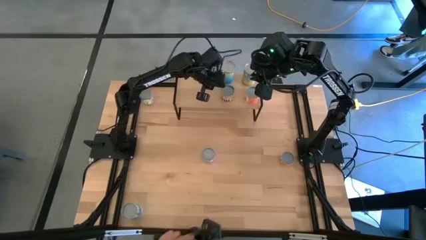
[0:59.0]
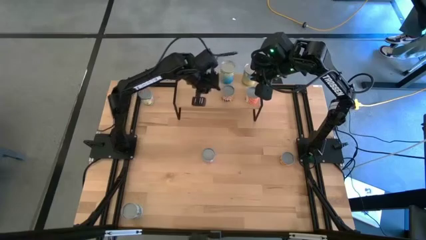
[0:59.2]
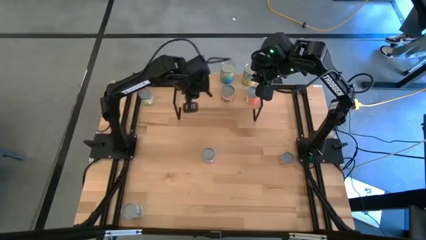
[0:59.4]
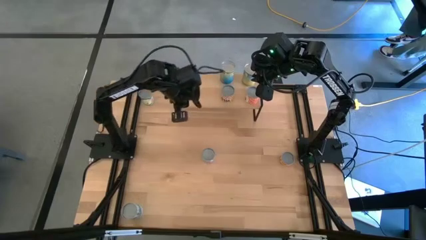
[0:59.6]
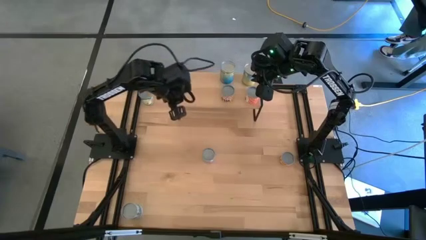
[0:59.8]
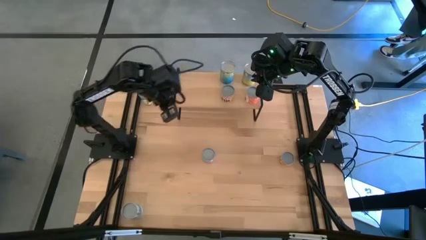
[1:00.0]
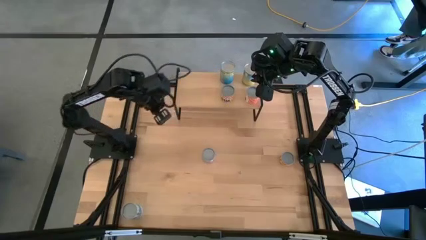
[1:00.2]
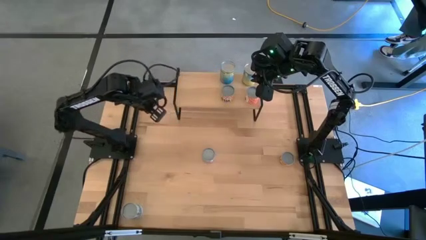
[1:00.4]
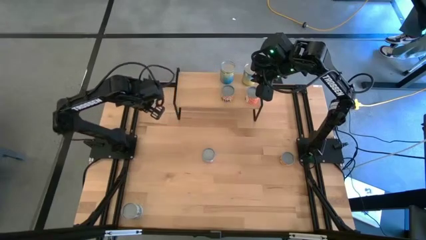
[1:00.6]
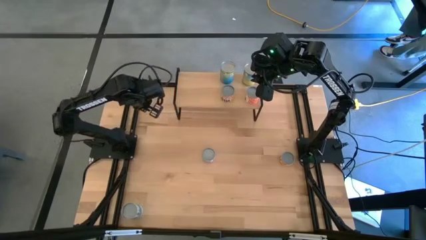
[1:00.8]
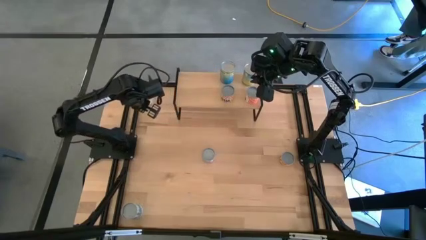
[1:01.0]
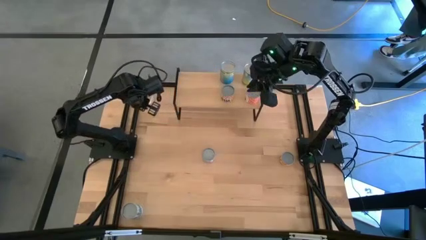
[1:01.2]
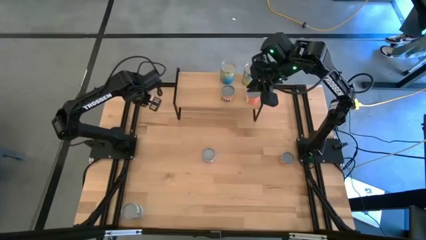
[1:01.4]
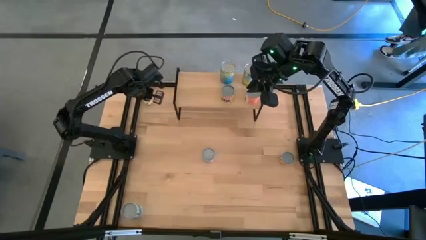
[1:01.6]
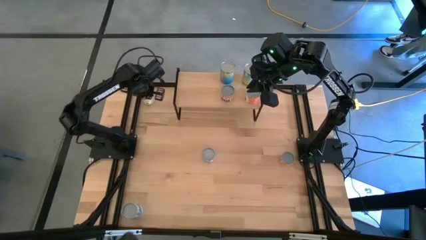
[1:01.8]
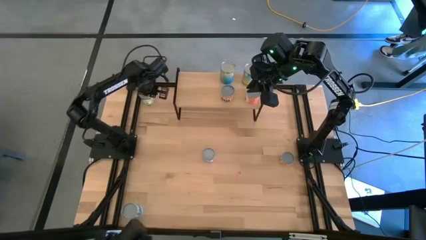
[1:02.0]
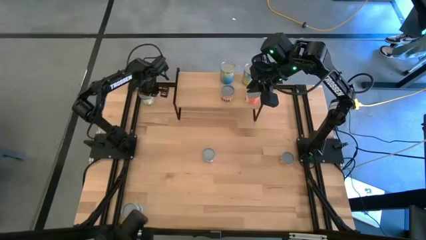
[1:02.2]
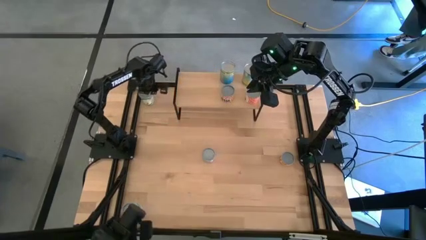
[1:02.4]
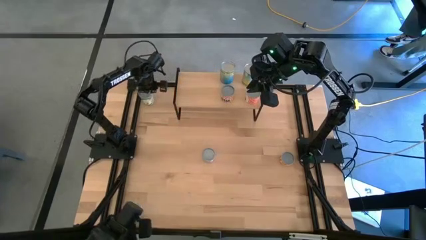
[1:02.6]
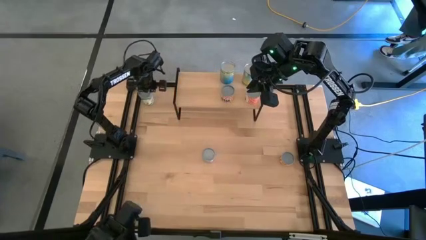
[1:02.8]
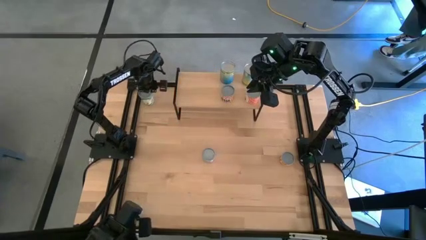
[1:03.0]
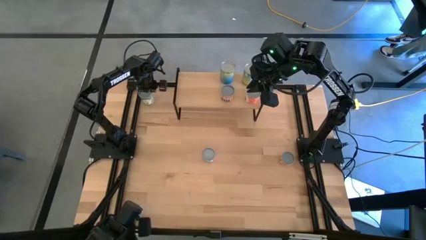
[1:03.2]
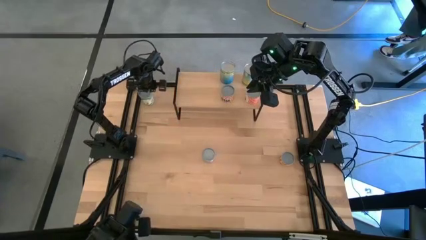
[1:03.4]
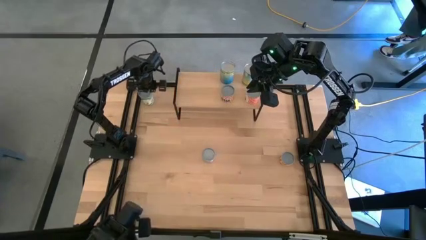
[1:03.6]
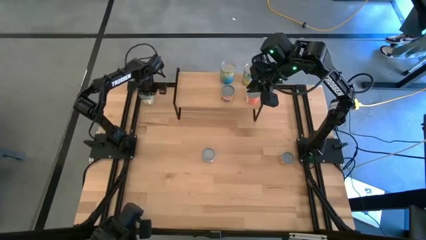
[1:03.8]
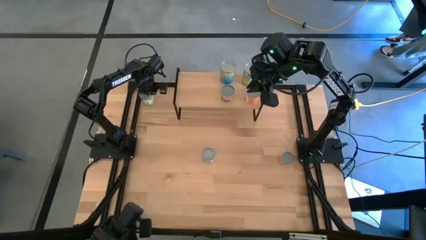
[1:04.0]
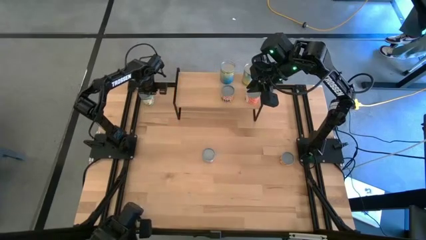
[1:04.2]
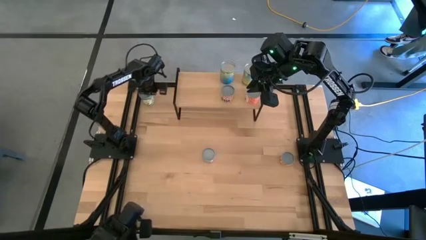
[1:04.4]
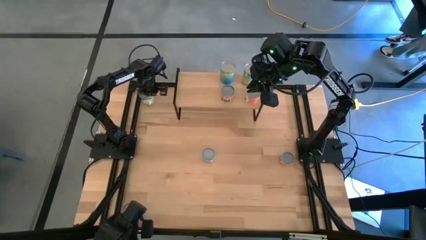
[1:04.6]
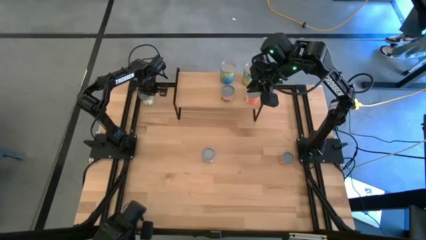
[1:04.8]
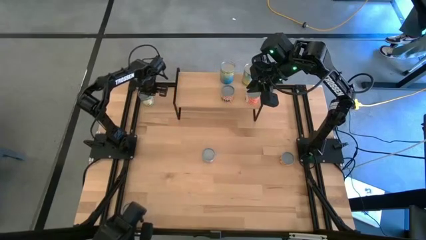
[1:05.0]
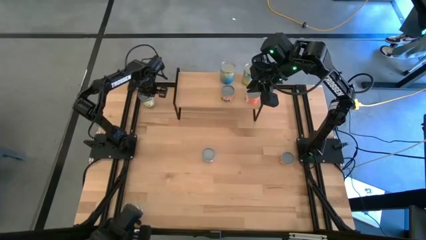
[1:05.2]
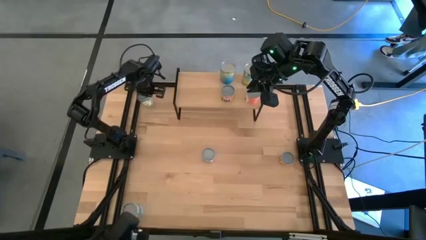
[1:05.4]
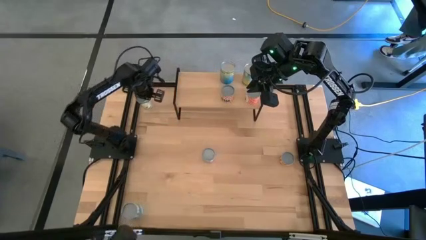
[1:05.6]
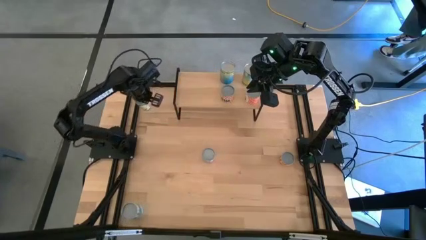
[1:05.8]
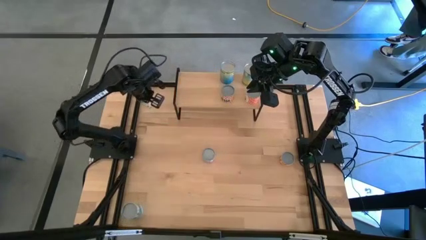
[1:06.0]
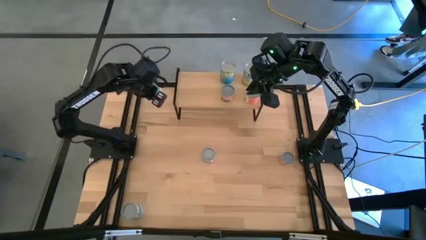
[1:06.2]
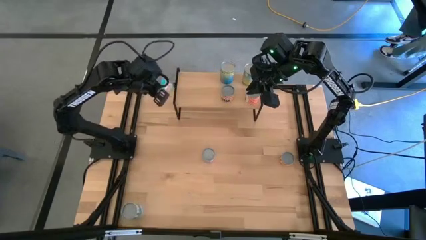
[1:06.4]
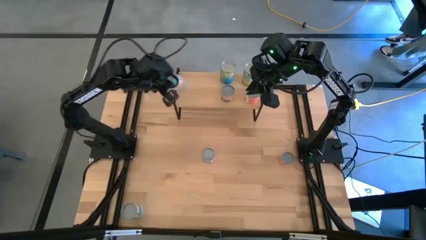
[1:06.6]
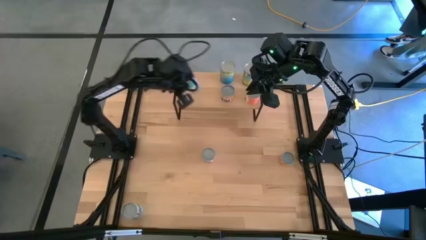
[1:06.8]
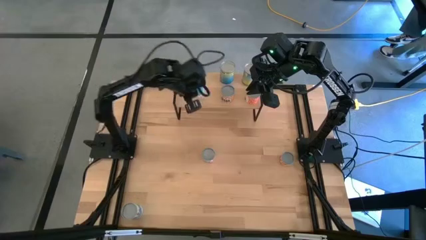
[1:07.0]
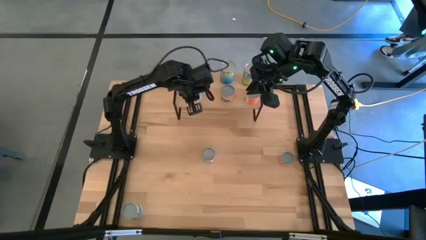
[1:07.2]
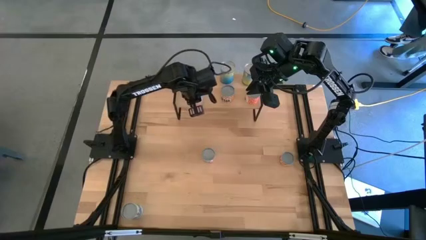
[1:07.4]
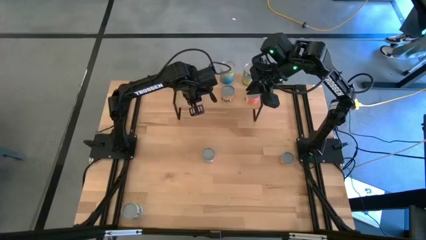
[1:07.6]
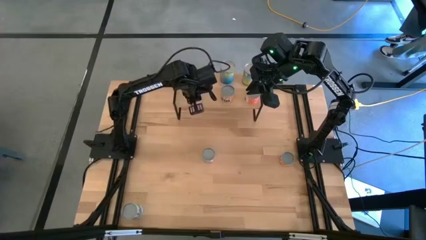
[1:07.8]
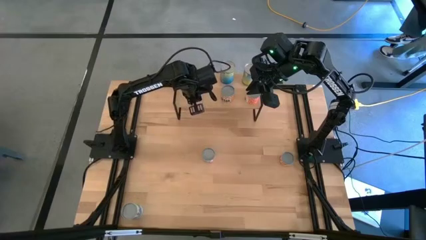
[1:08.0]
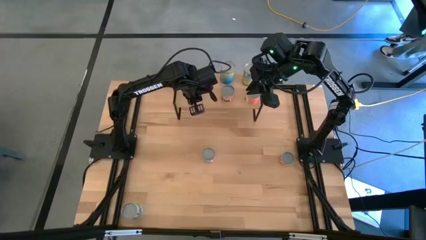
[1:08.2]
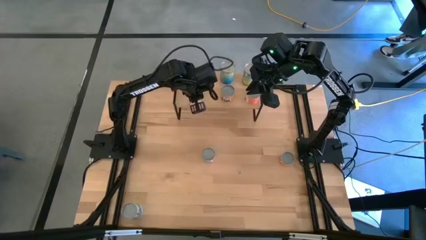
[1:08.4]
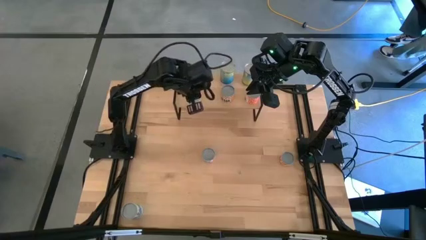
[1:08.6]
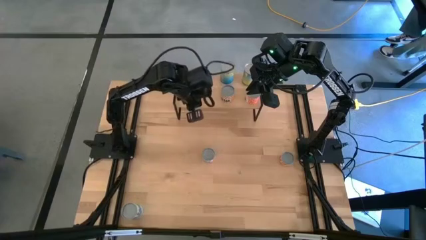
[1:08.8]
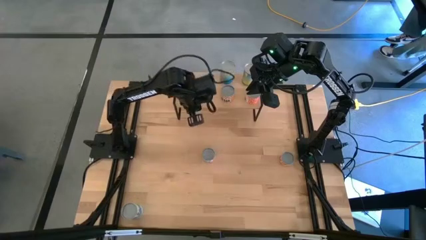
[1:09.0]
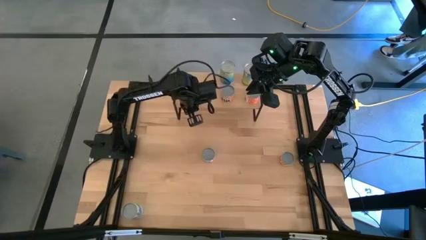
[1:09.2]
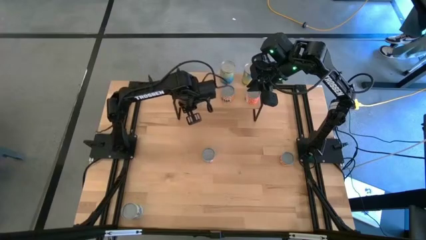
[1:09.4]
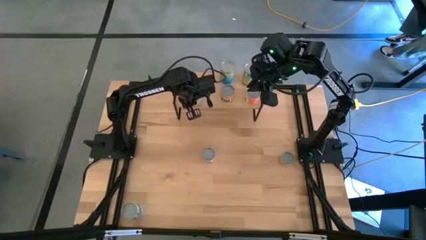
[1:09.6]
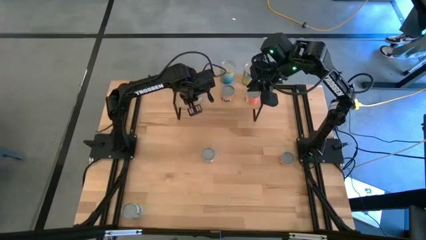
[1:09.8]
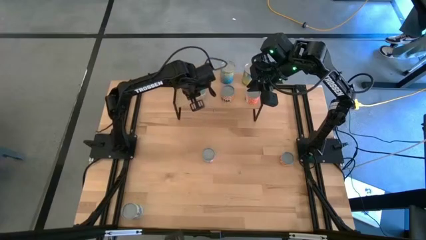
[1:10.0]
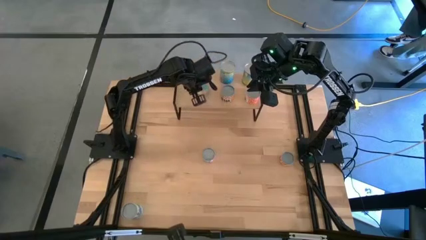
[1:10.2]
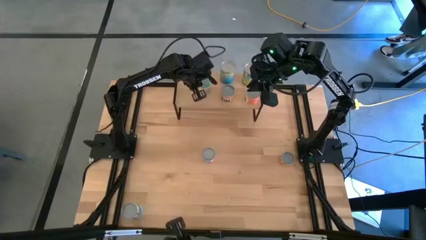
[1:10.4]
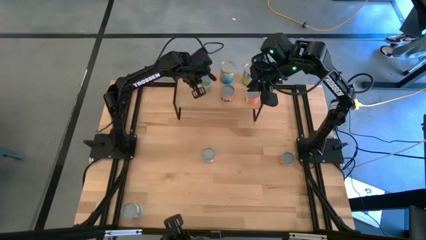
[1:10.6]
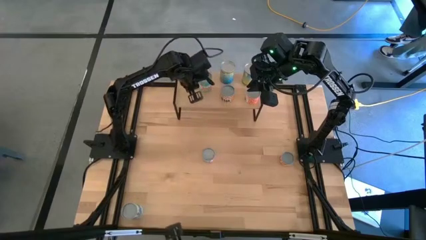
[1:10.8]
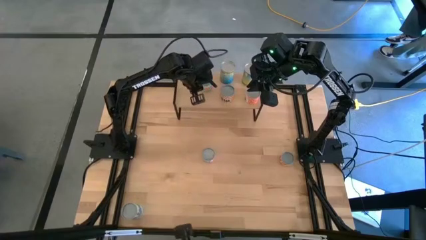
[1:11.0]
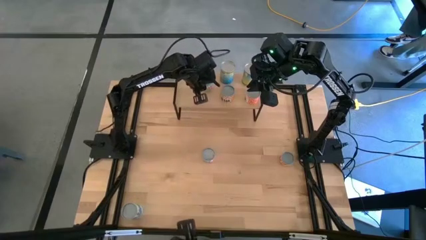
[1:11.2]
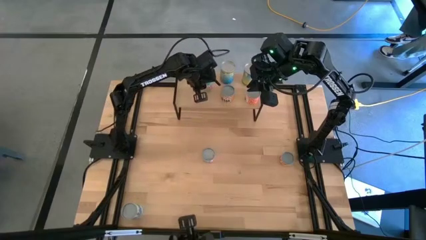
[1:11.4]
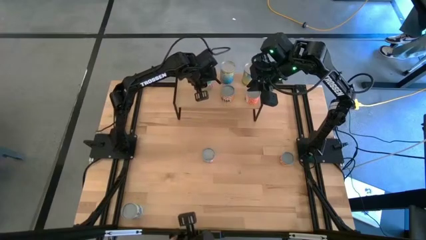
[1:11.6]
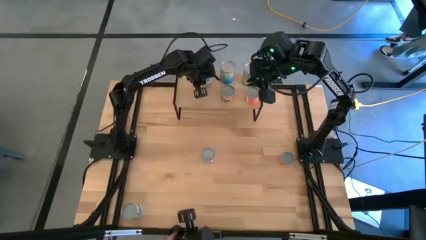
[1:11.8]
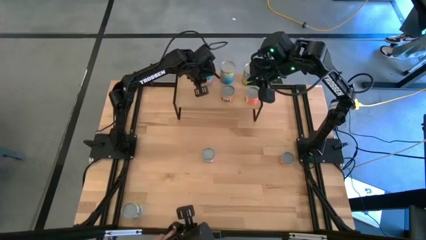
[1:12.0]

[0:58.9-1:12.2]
Task: Pick and place cans onto a shelf
Put the canned chicken soup on the shelf
